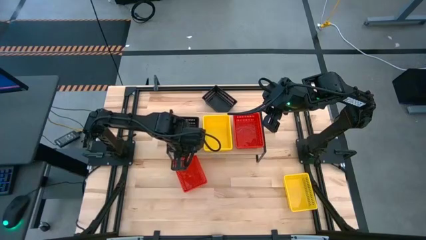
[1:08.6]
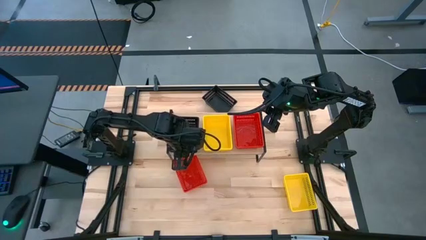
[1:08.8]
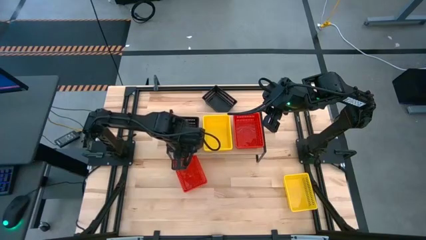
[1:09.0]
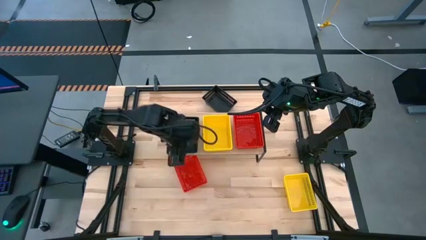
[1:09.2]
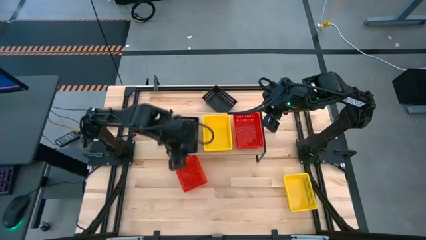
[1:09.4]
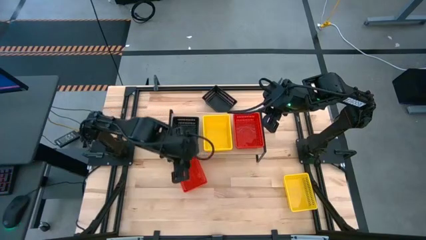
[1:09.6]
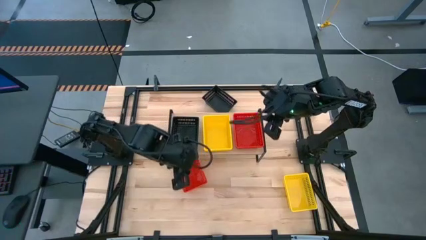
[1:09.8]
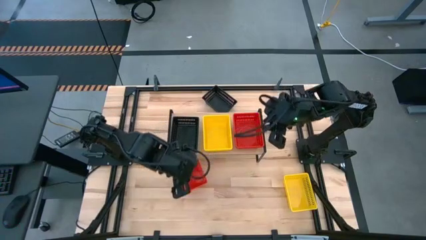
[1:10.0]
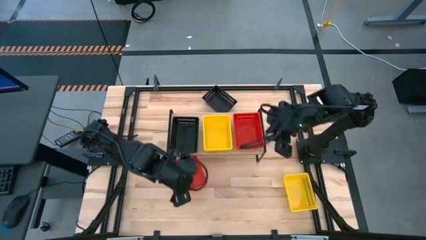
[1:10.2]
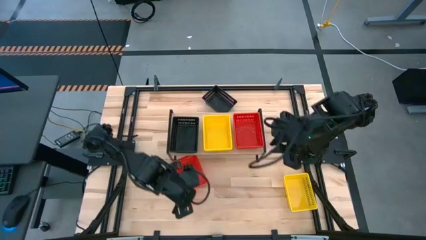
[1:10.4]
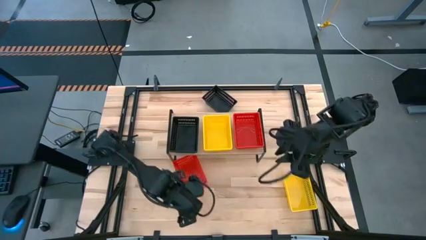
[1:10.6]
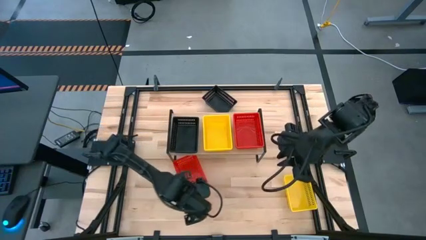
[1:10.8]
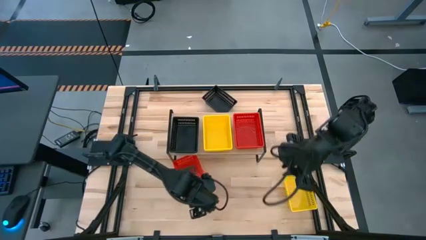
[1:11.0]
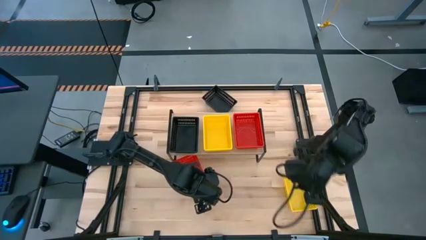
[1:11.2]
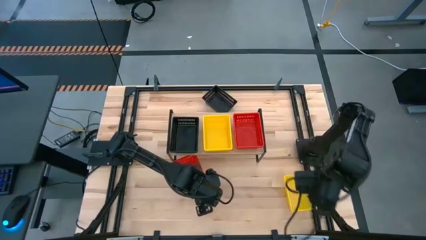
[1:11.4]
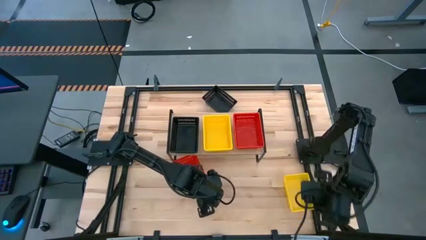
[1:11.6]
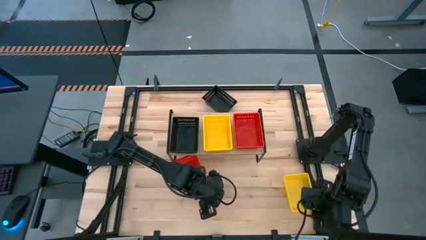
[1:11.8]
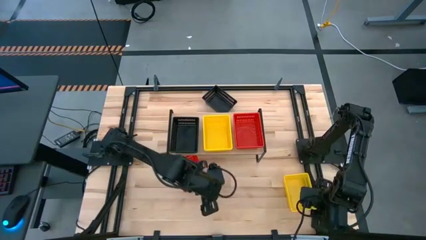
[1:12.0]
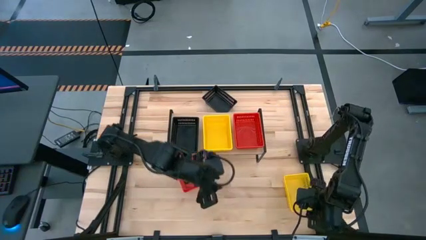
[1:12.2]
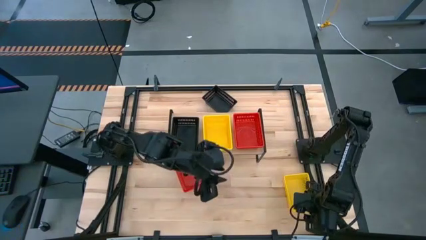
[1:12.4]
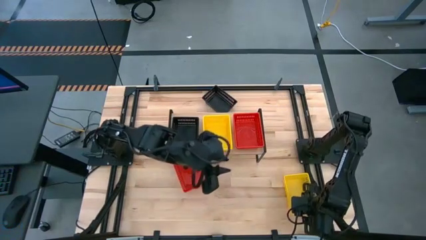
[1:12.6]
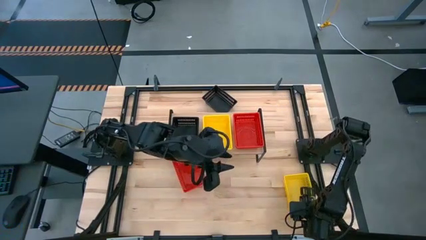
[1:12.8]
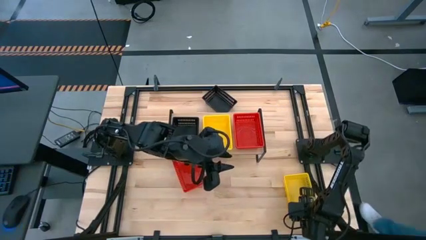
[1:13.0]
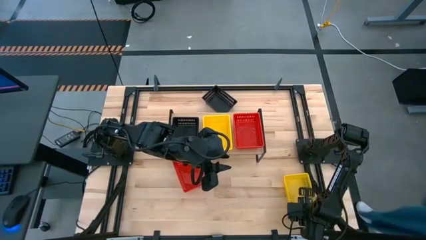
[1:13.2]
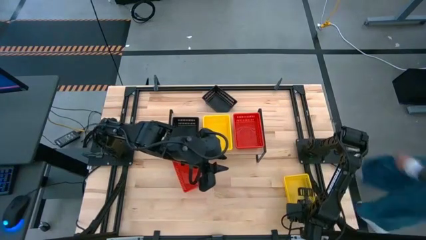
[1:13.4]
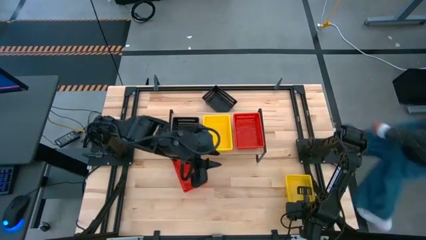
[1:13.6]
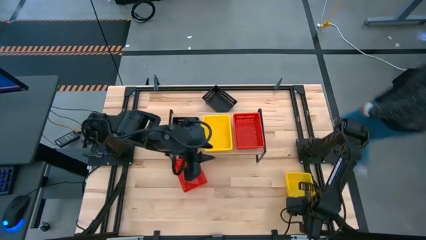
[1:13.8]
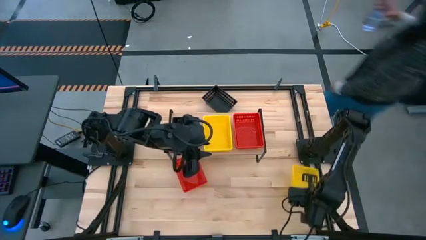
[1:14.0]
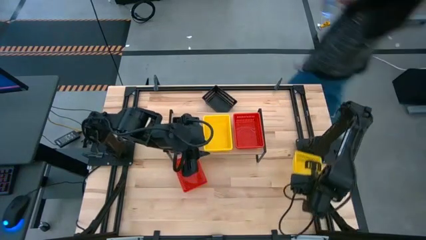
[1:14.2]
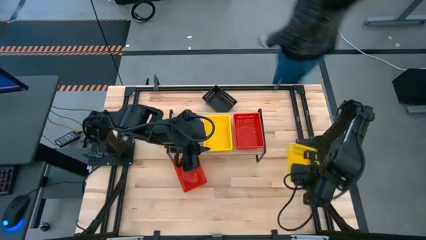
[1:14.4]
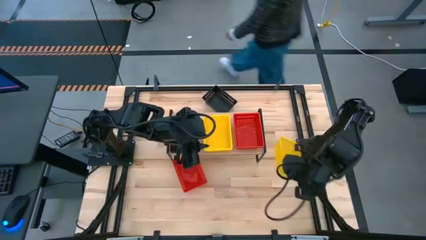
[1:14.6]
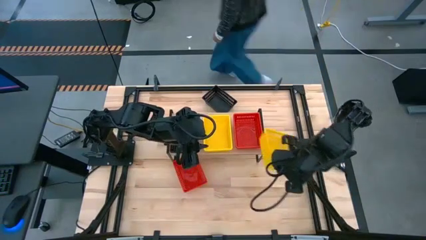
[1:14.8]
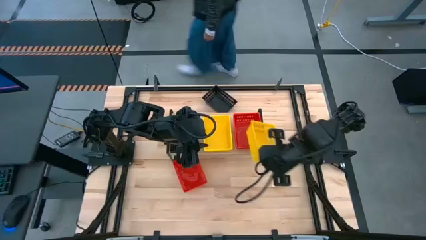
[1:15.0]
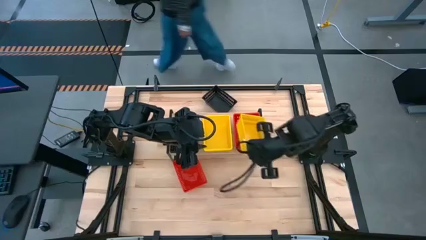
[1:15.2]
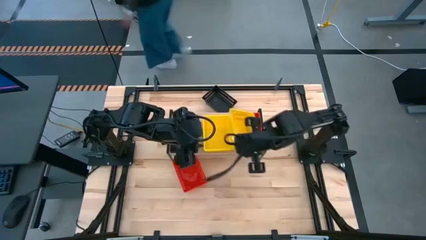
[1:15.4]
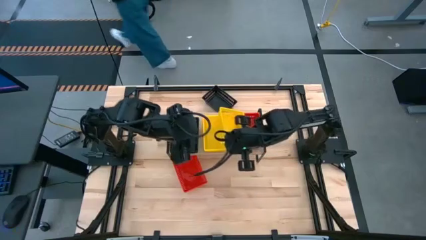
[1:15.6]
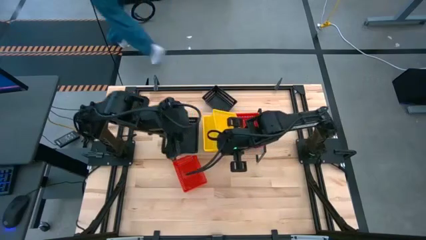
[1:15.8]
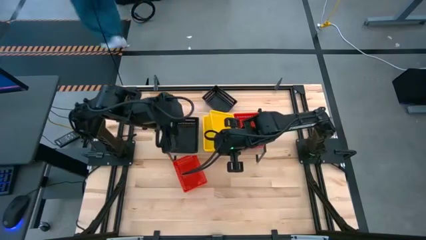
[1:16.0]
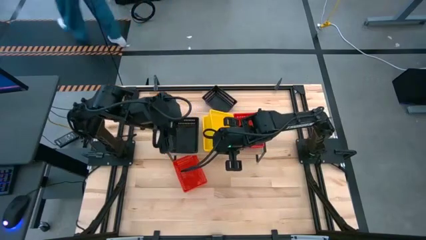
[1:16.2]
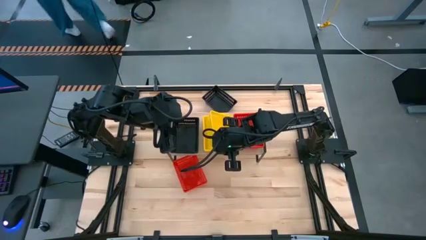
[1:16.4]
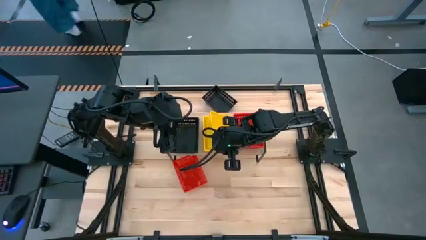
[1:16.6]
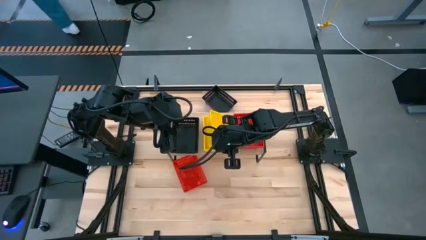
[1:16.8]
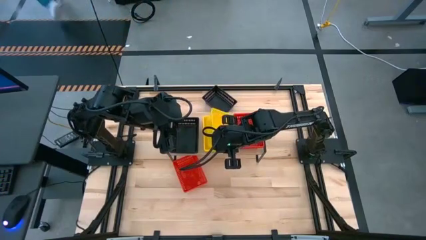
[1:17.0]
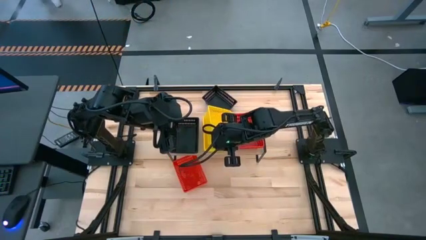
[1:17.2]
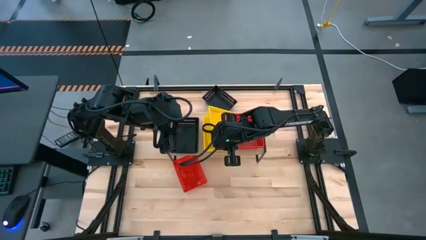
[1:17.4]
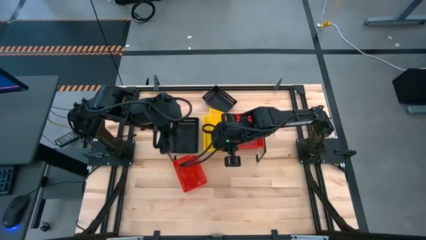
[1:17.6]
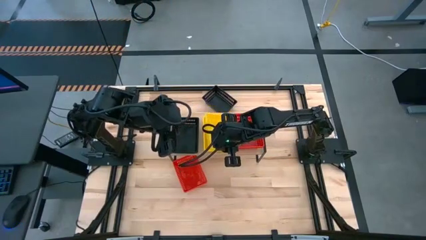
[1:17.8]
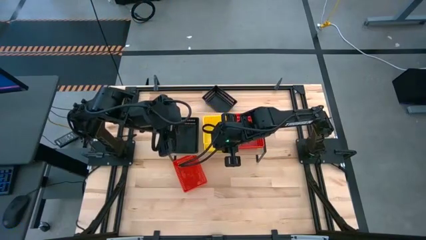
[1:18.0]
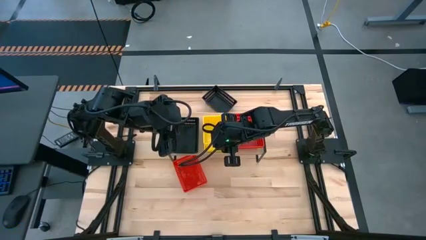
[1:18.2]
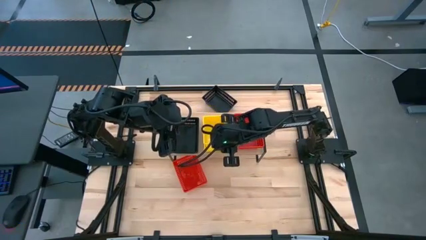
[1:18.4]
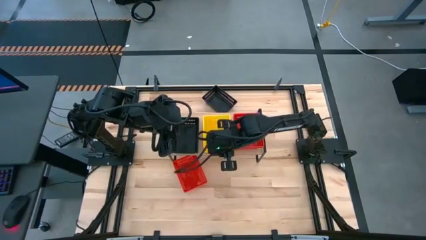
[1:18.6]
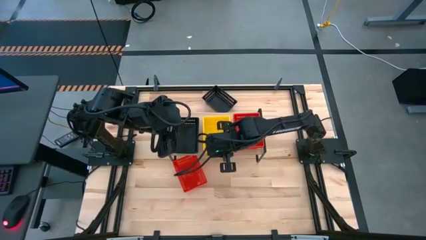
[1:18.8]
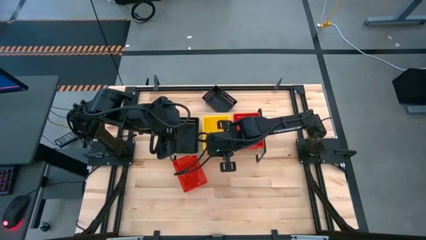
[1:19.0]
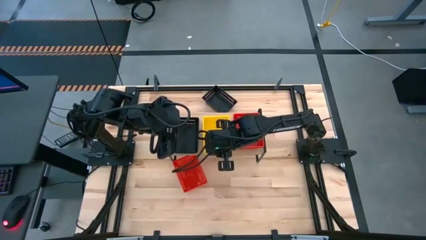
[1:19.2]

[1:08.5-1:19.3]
Task: Stack baskets on shelf by color
Stack the yellow basket on the stacked yellow baskets on the shelf
